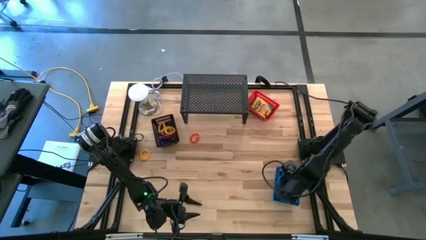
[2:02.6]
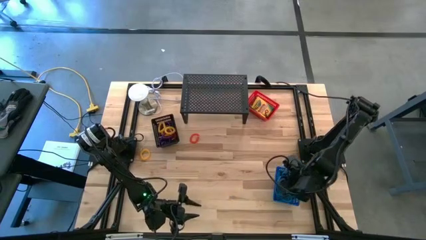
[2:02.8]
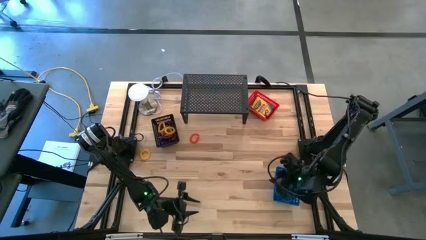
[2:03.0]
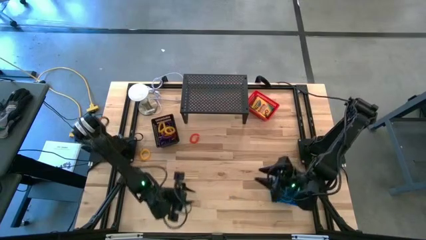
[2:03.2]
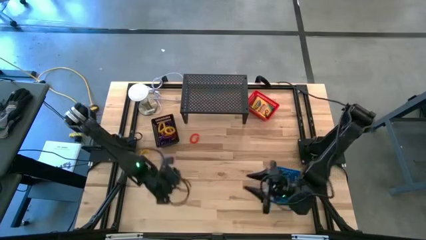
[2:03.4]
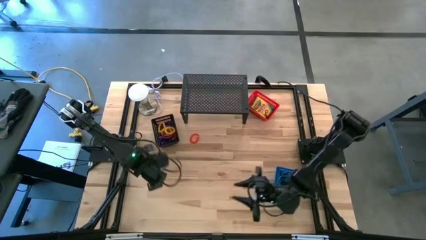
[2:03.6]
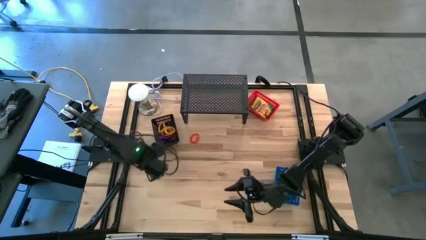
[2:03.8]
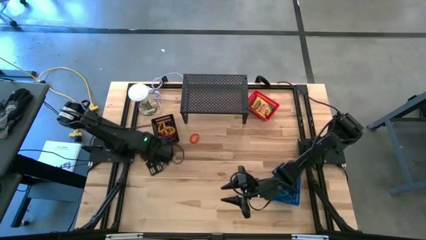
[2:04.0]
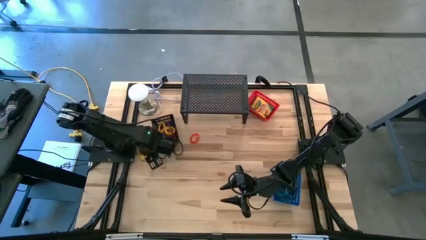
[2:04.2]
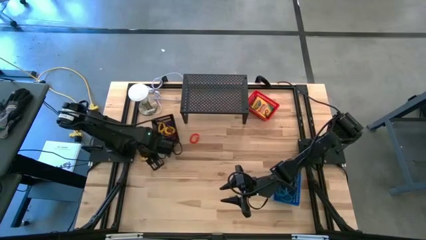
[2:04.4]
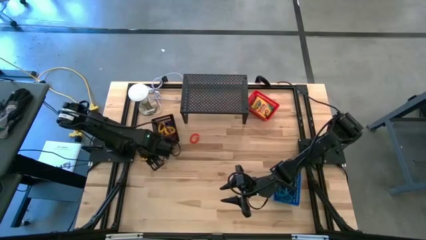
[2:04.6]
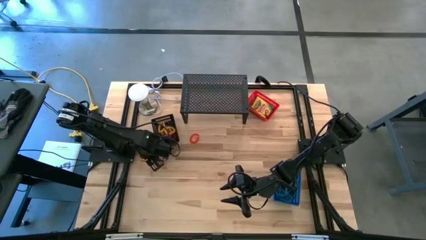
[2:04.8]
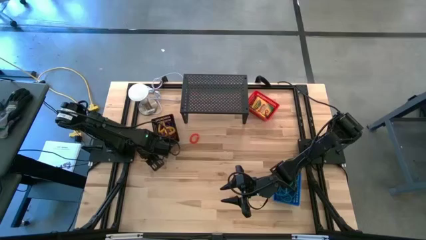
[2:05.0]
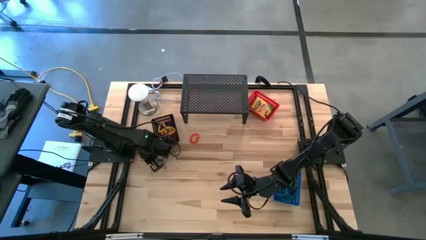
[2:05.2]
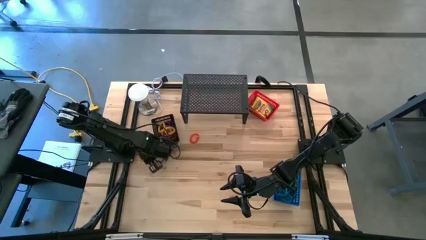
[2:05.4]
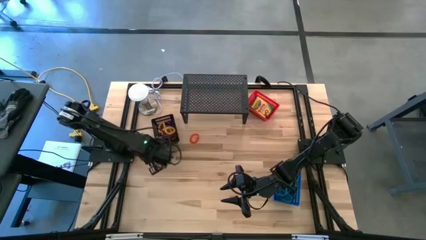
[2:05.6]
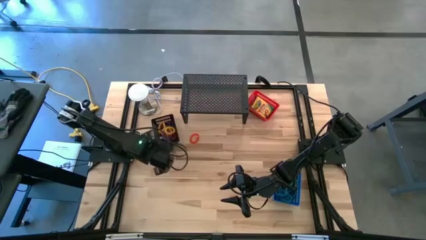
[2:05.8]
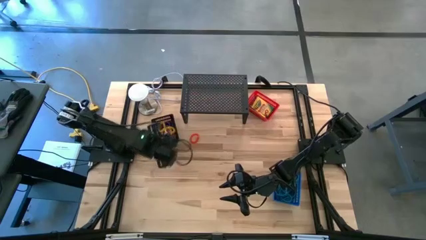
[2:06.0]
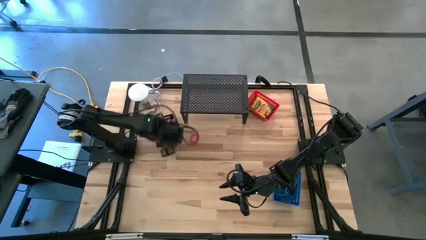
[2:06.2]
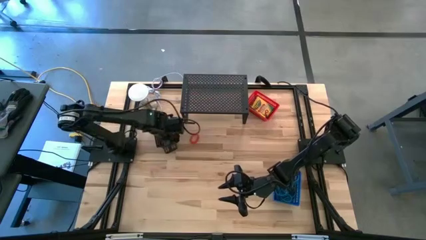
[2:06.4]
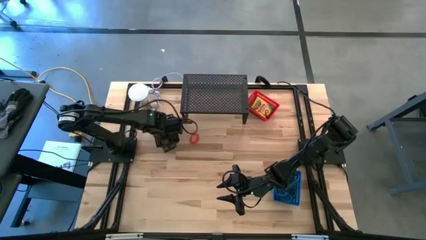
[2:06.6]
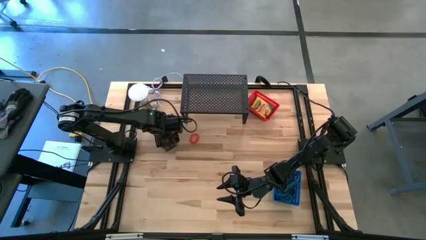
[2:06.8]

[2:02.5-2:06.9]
Task: Pick & Place Office Desk Supplies
Put the yellow spring keychain into the black basket

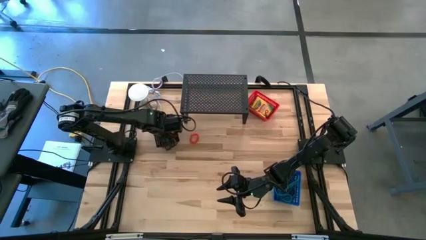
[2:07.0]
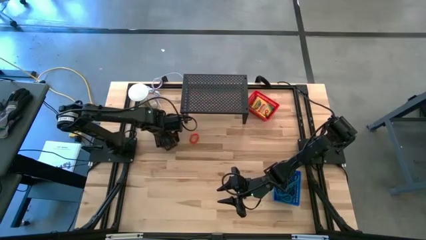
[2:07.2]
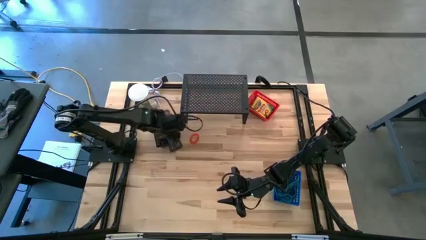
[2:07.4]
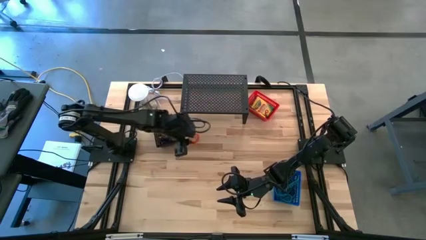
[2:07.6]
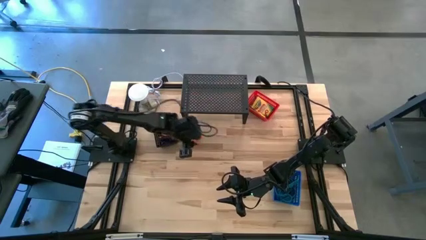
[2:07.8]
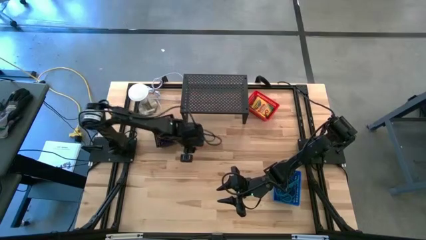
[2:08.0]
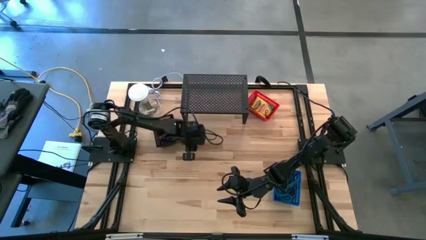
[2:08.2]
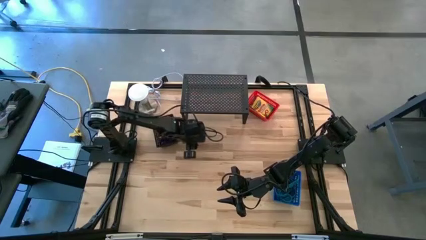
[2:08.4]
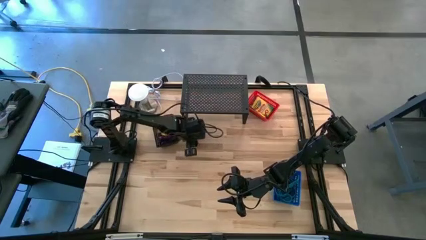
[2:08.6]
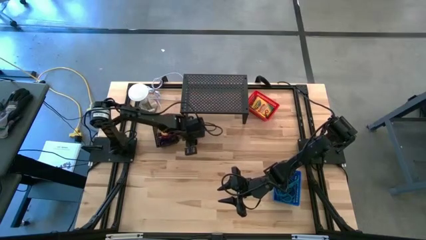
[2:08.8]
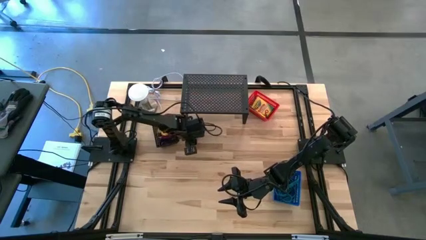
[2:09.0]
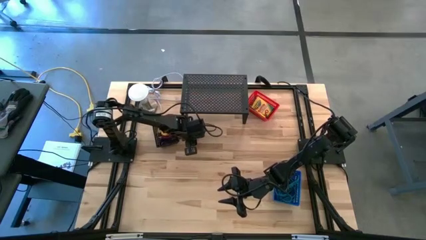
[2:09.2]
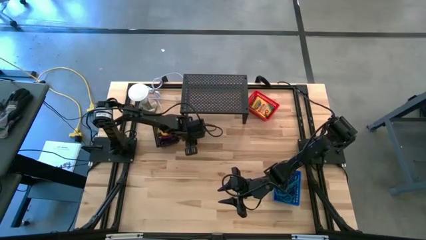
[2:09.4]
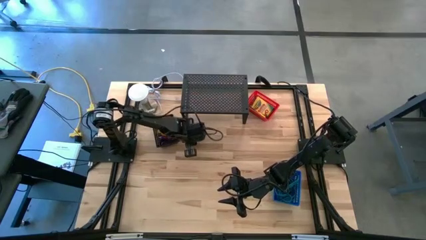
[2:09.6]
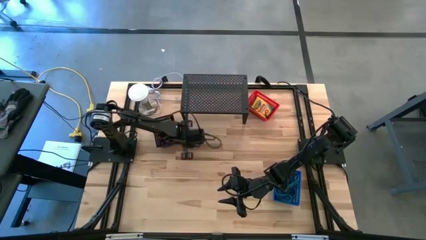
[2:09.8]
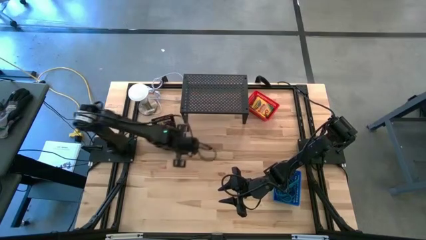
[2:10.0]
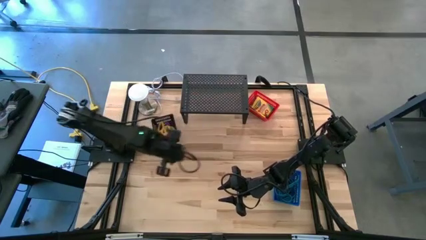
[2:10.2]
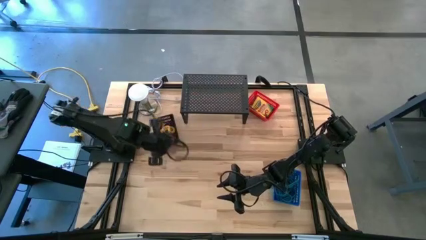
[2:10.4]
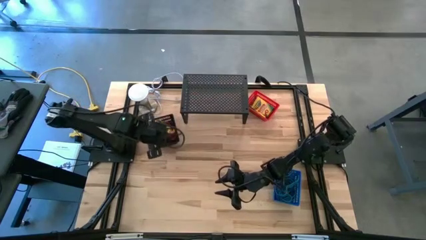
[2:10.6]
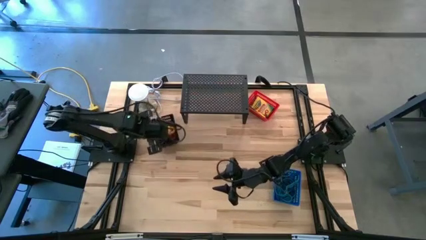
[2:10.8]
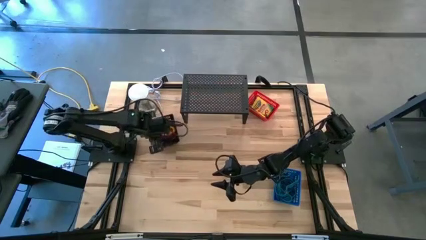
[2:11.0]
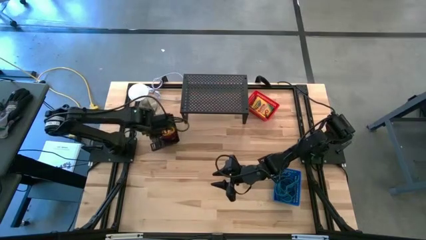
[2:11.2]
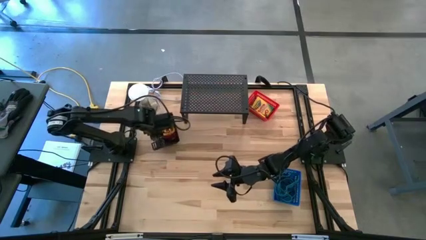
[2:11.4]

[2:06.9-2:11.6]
Put the orange spring keychain into the black basket

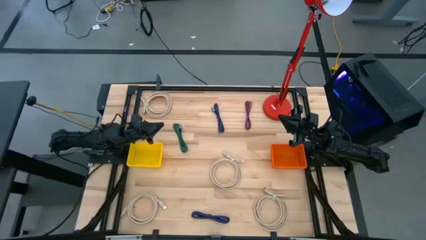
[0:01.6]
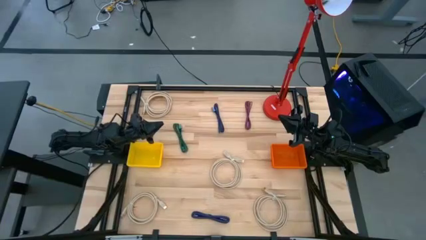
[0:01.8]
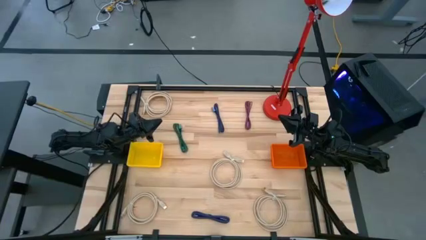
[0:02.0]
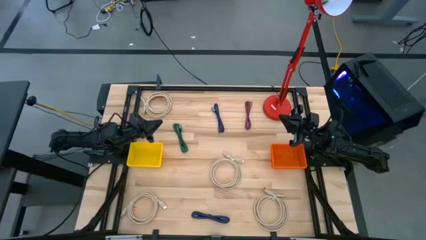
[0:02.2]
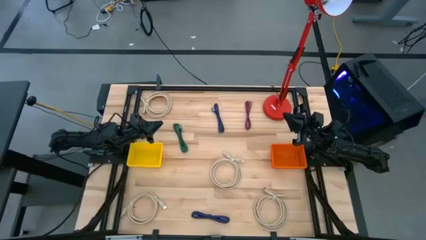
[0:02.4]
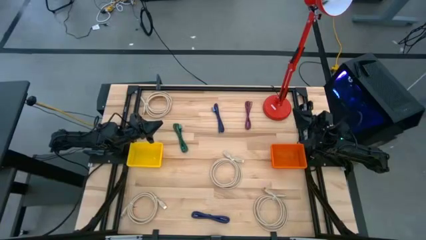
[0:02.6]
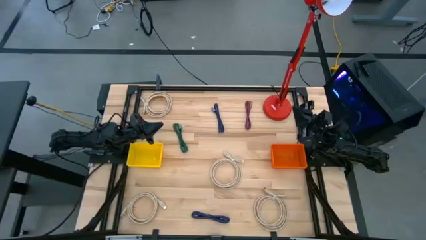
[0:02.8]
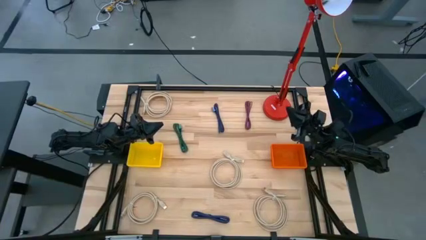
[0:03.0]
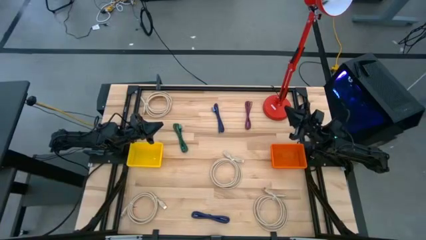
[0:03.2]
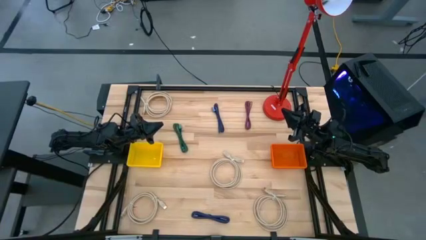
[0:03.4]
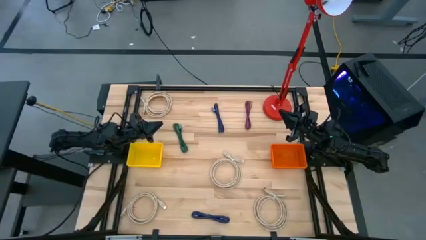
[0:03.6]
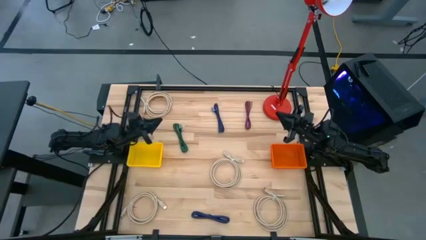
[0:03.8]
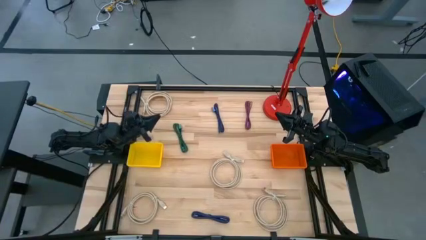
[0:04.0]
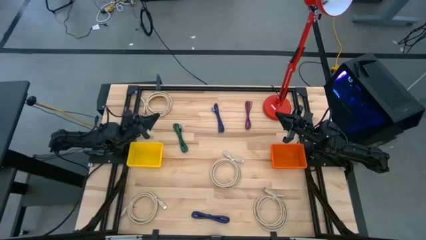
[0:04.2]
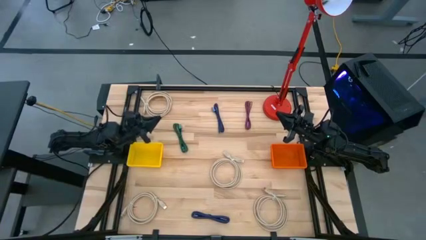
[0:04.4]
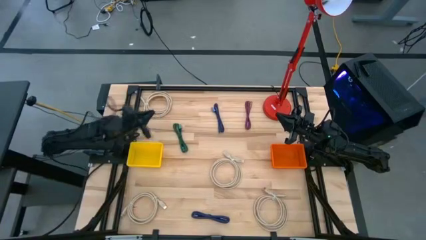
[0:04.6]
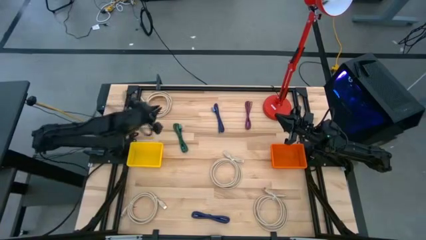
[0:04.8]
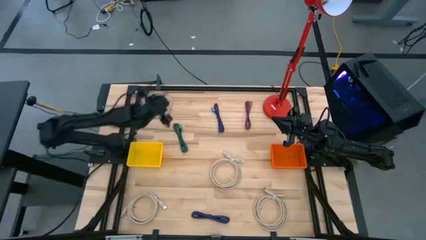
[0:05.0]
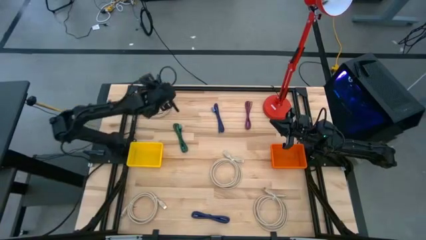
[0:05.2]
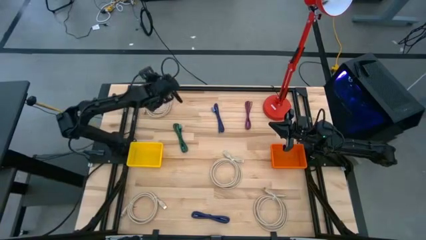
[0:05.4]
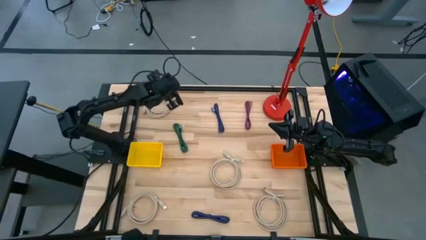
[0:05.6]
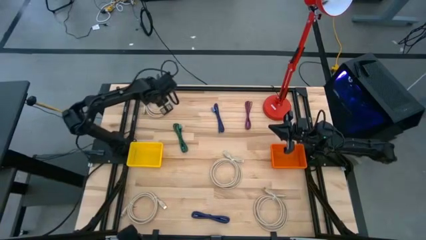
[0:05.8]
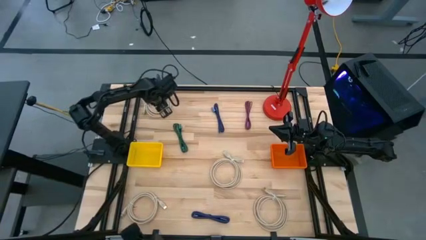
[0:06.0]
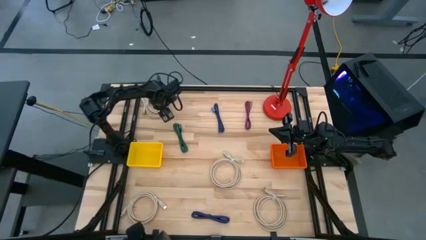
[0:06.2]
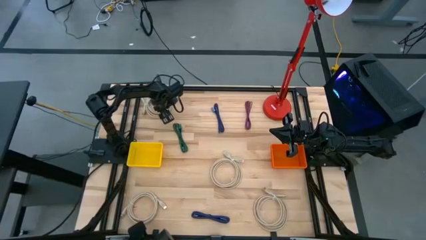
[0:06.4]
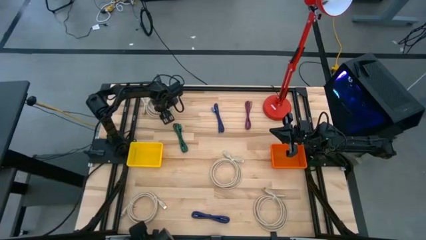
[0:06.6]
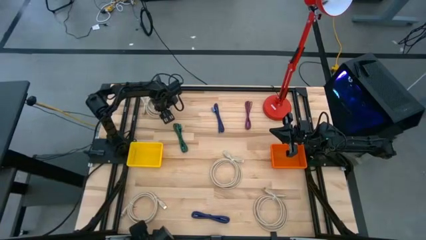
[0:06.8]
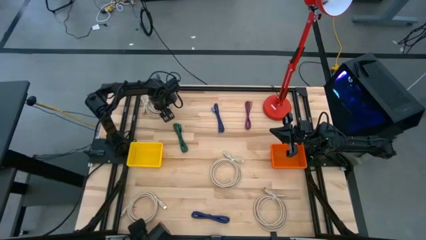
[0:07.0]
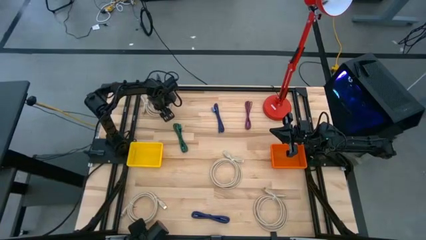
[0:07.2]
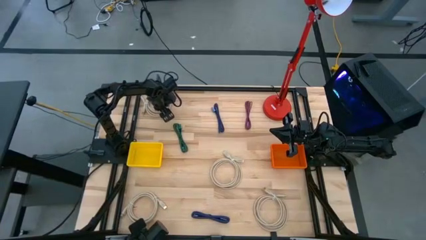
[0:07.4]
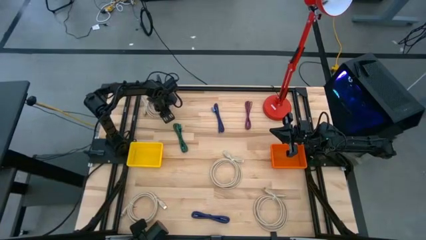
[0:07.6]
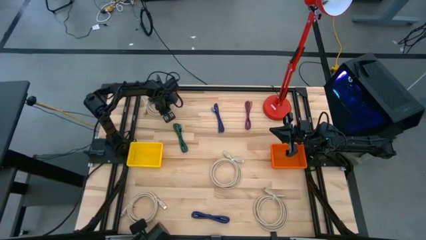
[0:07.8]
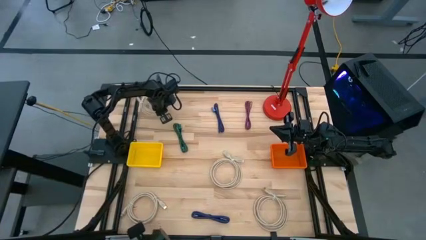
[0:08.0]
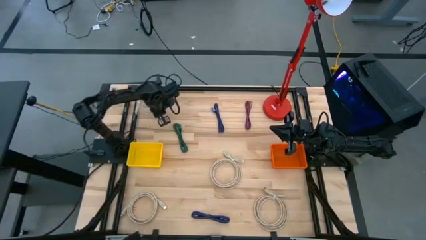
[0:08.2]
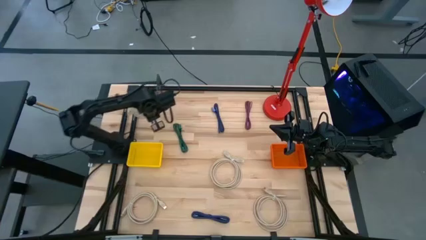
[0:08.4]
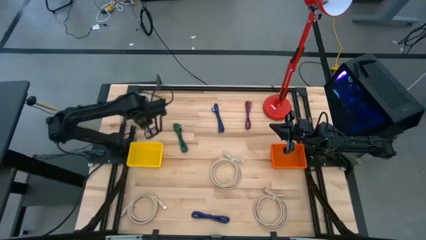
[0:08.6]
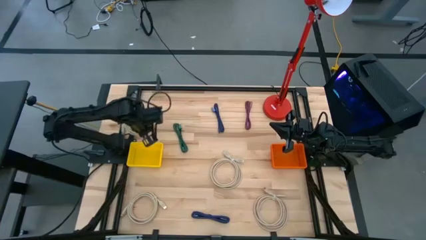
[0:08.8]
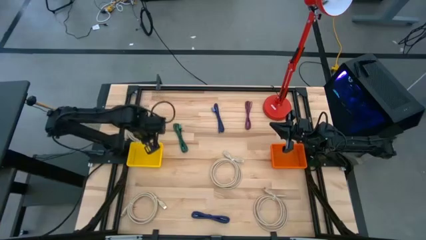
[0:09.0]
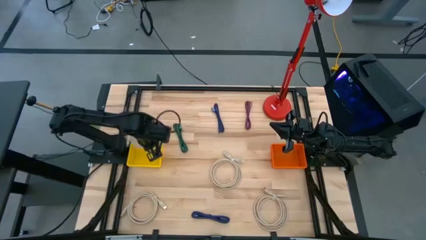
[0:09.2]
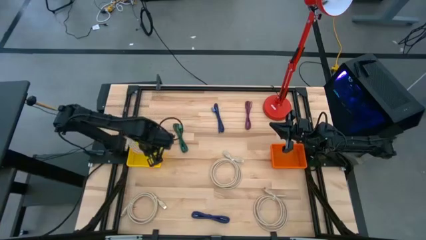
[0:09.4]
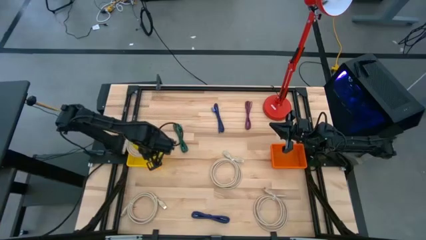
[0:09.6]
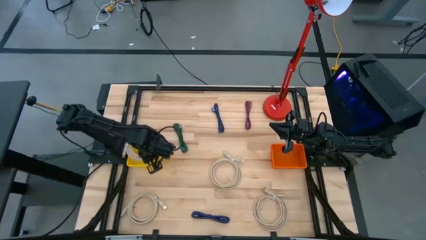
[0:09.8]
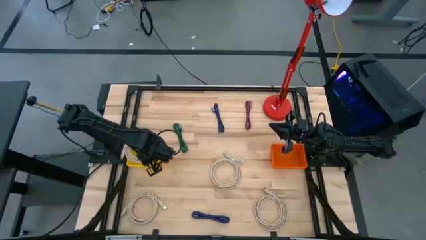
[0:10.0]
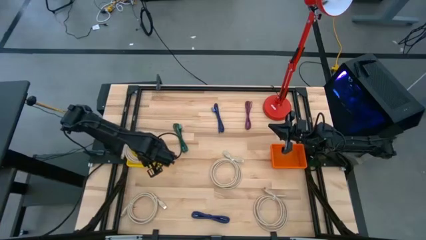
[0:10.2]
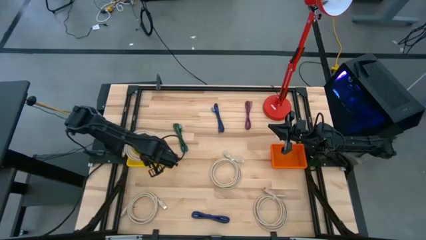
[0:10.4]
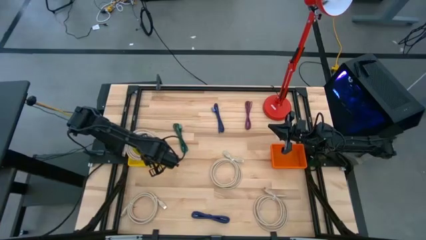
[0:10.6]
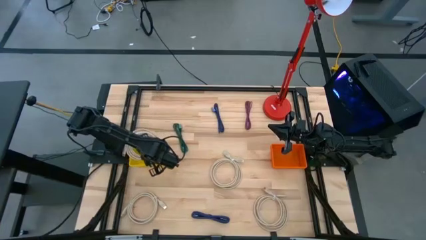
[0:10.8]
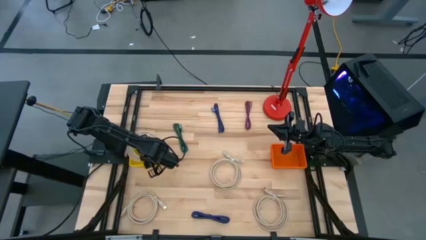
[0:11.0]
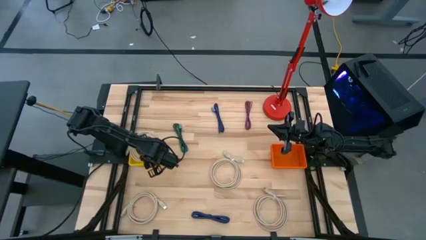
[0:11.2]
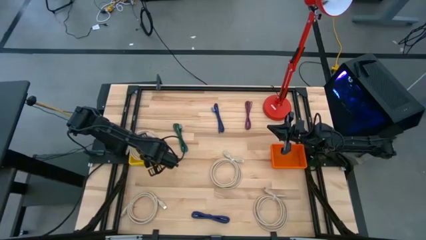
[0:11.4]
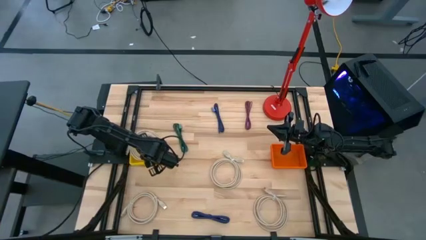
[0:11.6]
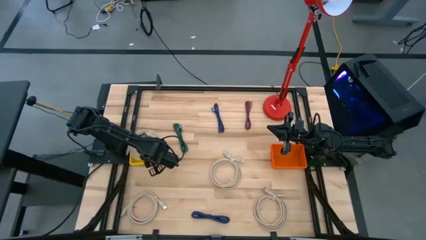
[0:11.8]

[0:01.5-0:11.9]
Task: Pick & Place USB Port
Put the brown HDMI cable into the yellow basket
